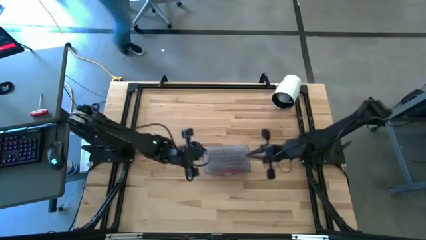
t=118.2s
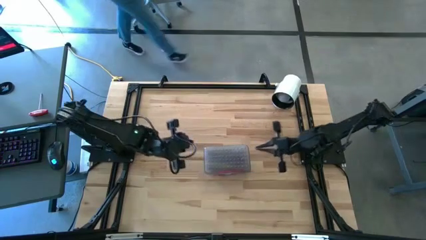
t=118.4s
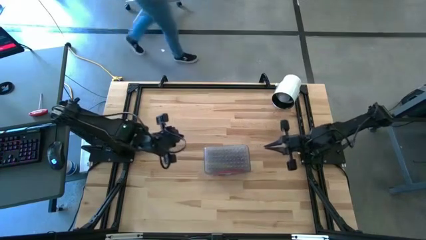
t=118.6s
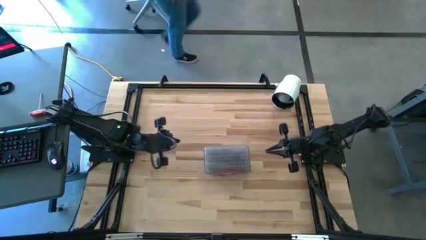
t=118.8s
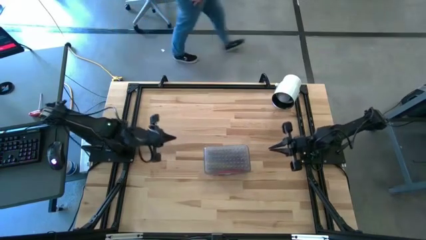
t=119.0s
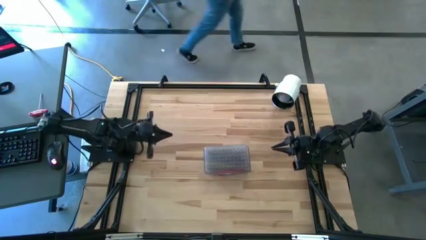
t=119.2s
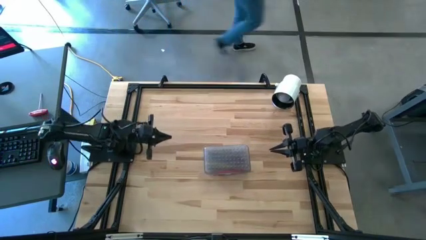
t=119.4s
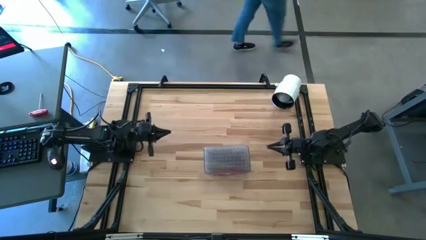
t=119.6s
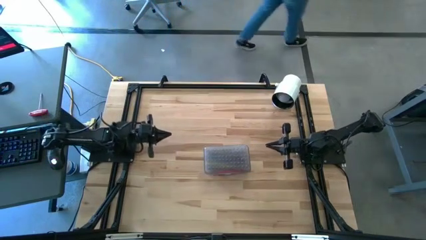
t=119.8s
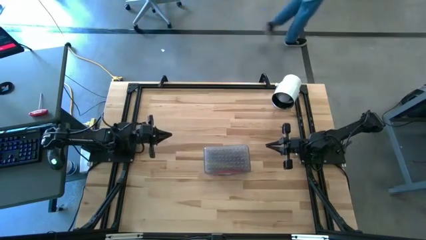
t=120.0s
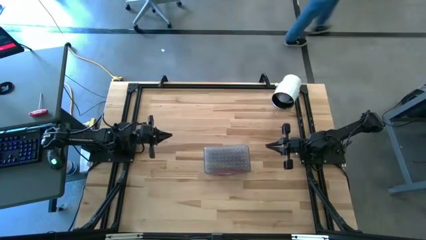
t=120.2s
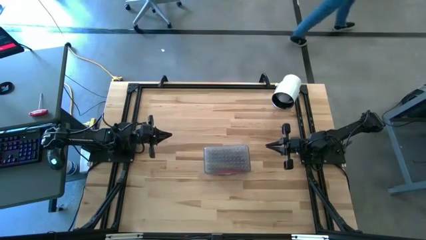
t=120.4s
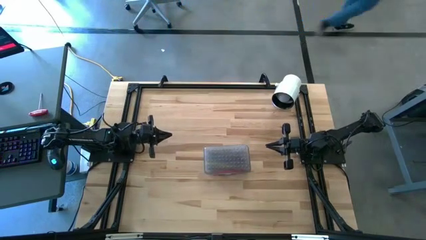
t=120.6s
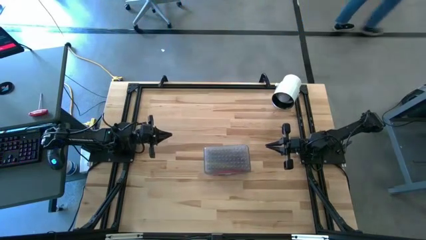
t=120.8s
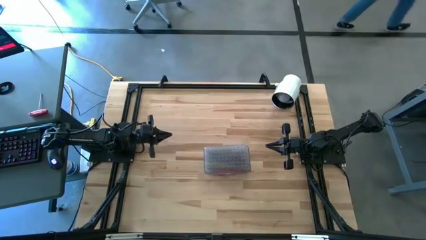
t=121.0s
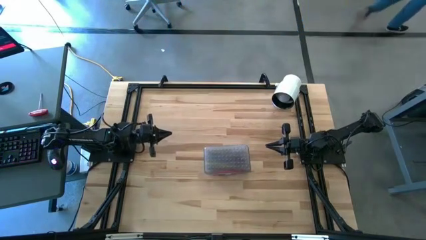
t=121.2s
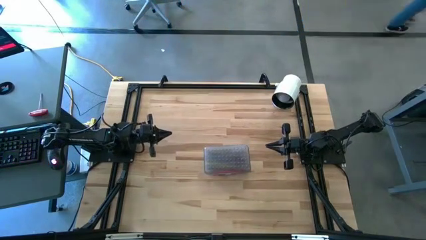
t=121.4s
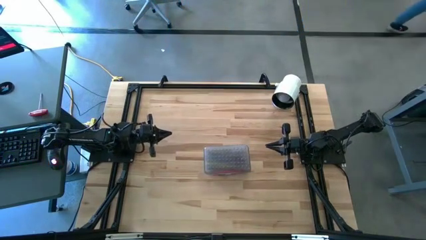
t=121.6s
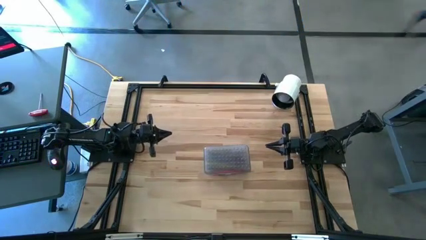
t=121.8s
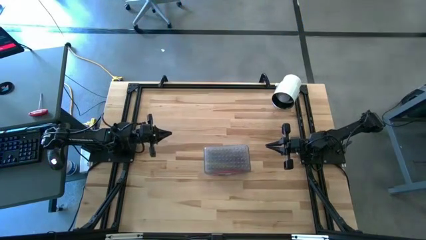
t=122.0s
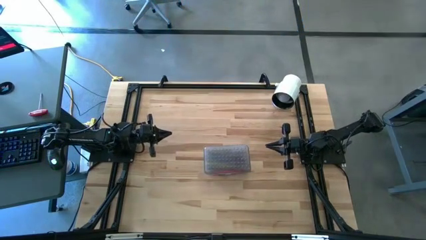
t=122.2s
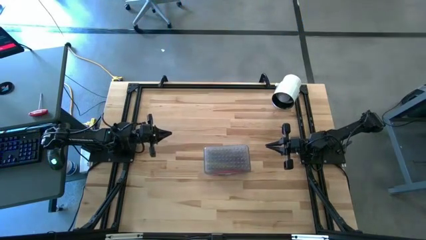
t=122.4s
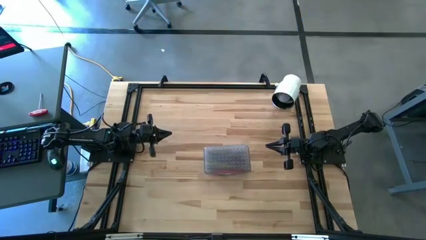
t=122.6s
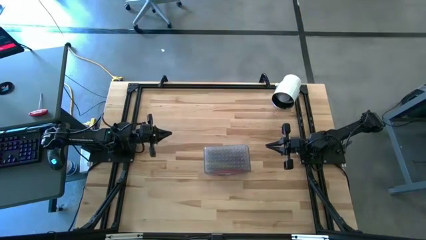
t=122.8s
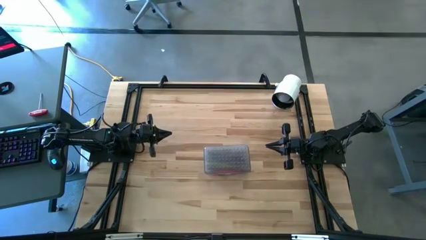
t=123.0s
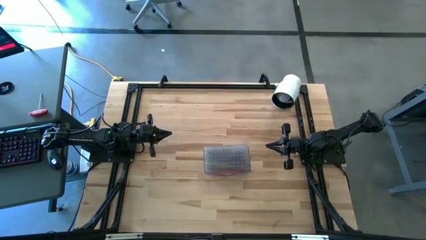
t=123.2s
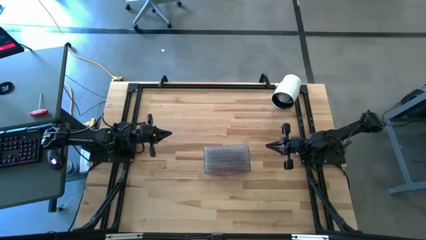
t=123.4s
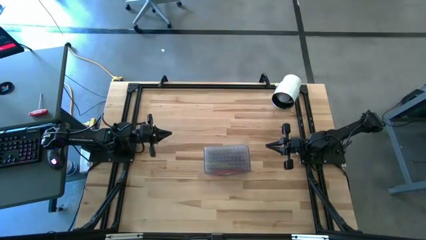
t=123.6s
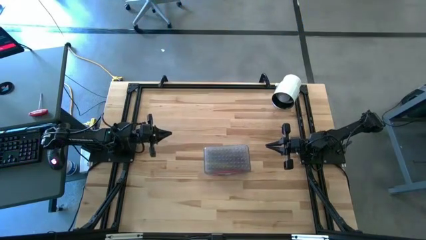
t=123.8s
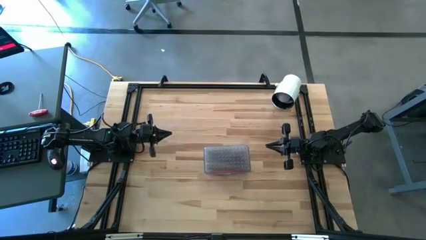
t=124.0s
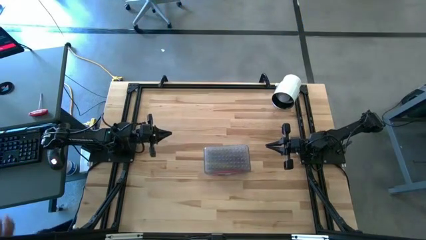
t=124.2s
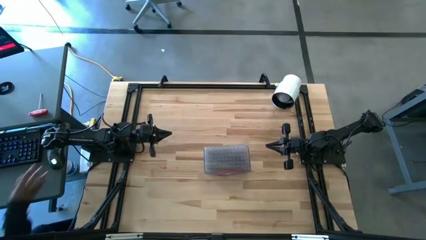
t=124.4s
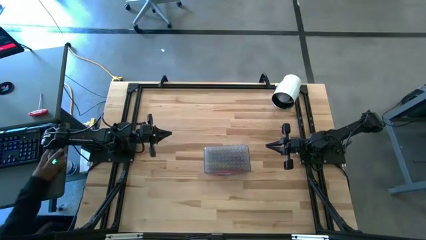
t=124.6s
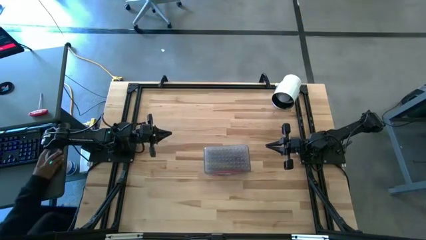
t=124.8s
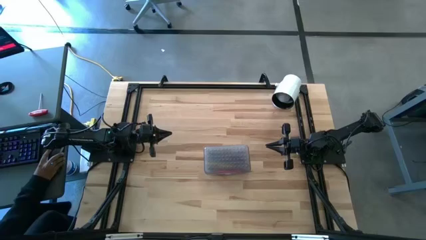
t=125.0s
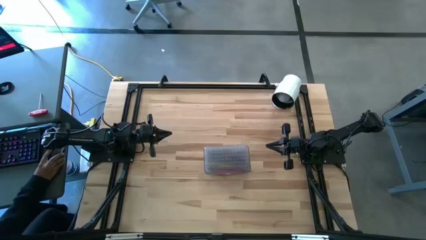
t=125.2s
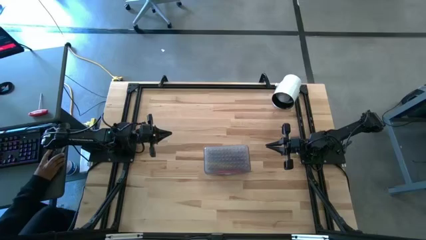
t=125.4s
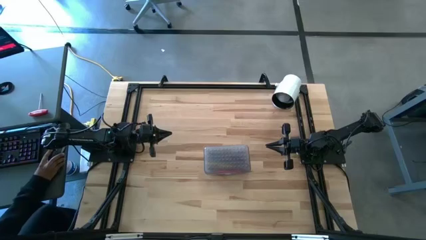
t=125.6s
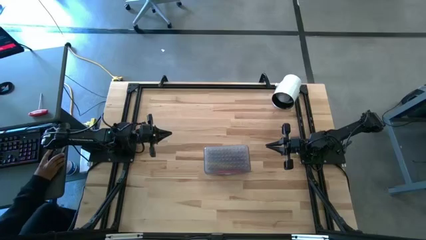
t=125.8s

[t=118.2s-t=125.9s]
Task: Pick & place school supplies into a supply box
Return to Home Position

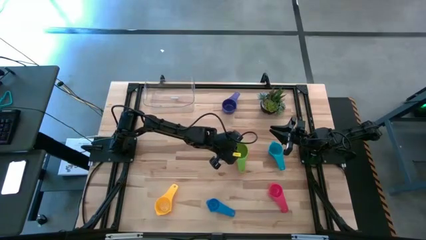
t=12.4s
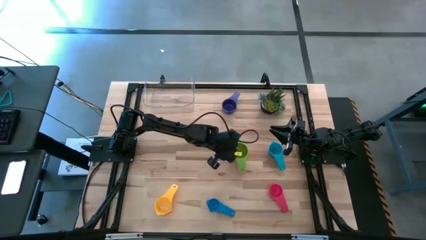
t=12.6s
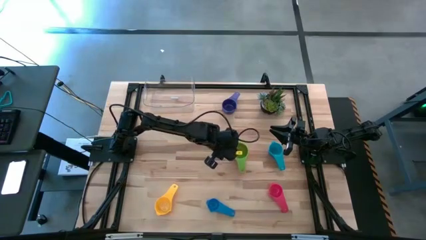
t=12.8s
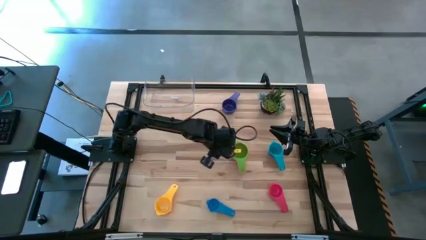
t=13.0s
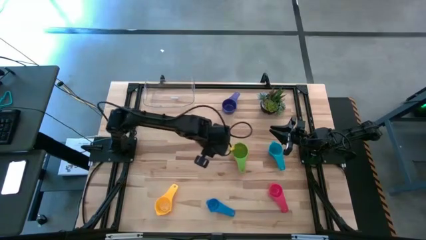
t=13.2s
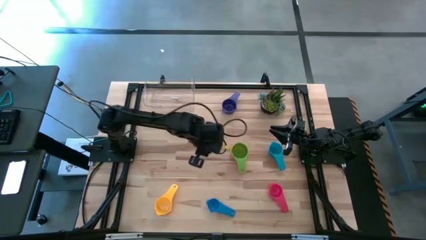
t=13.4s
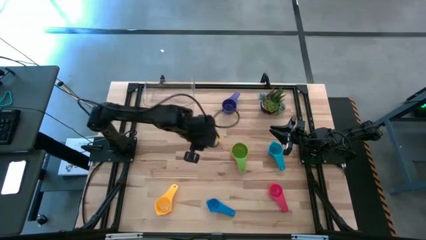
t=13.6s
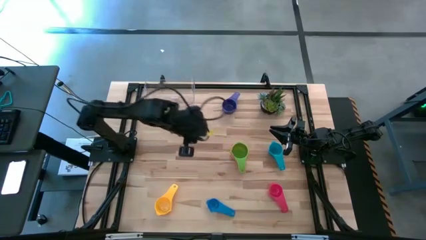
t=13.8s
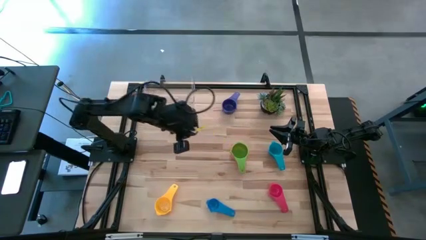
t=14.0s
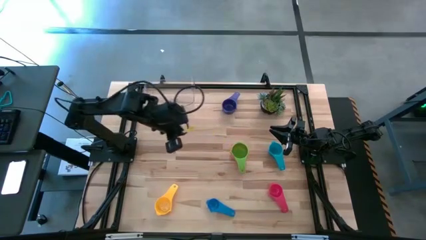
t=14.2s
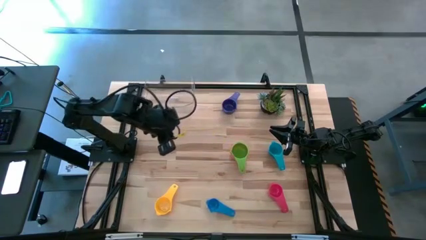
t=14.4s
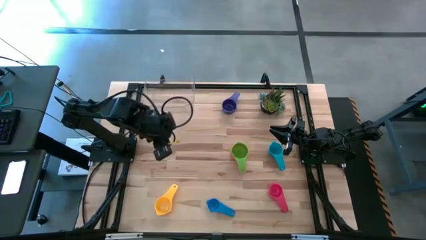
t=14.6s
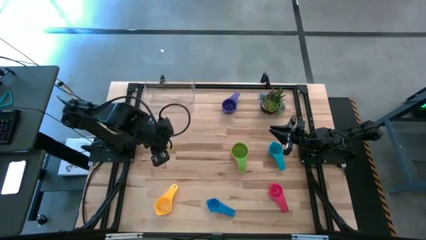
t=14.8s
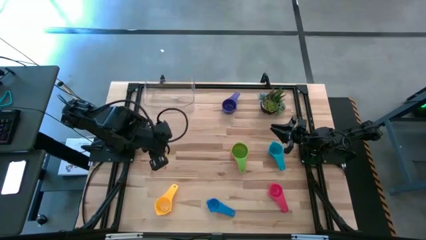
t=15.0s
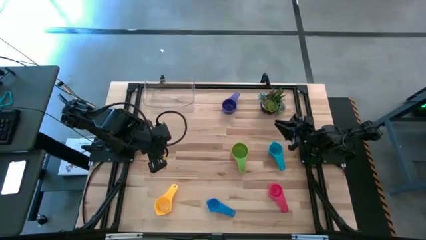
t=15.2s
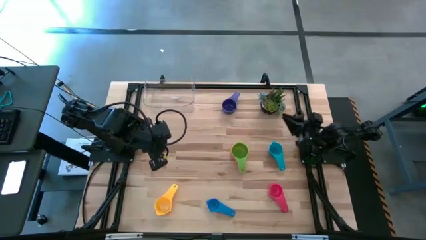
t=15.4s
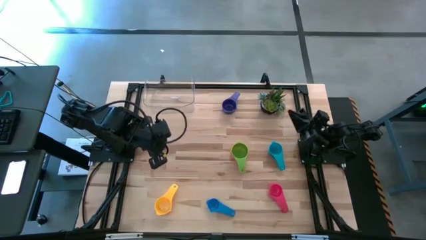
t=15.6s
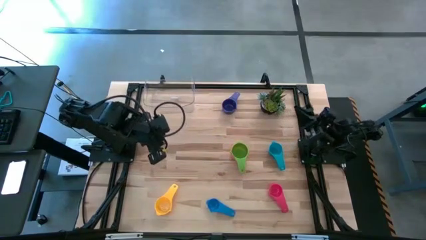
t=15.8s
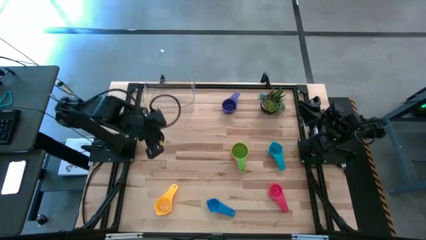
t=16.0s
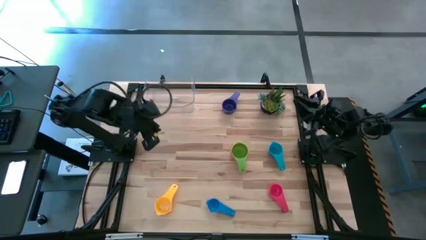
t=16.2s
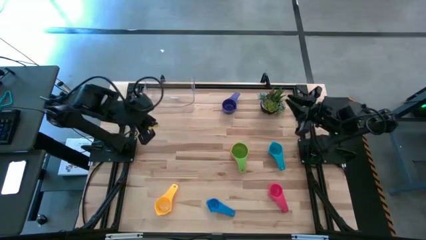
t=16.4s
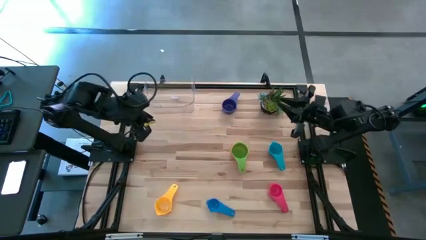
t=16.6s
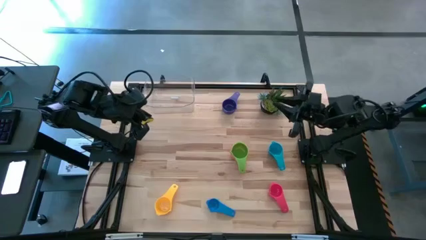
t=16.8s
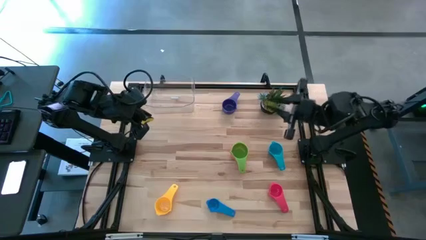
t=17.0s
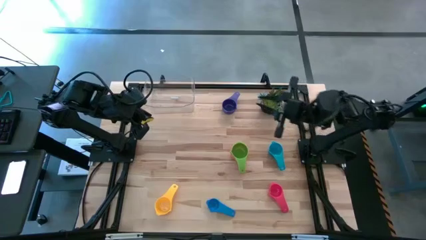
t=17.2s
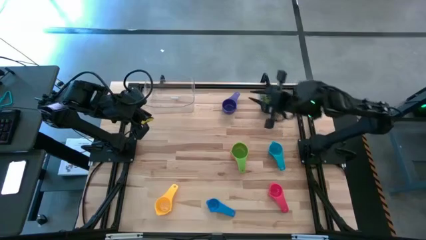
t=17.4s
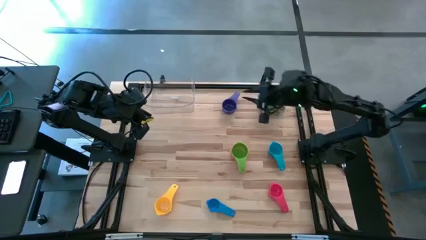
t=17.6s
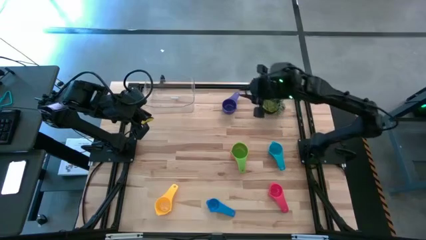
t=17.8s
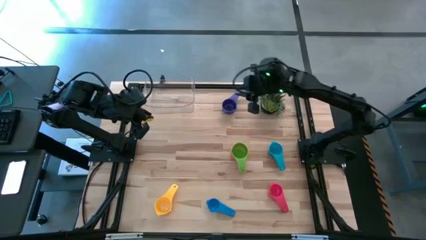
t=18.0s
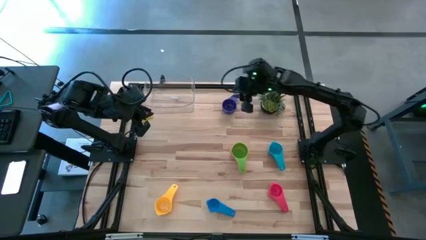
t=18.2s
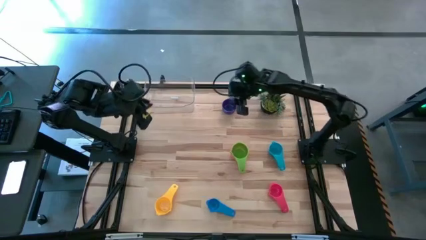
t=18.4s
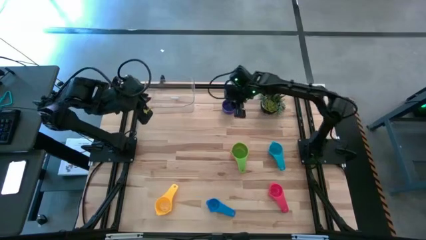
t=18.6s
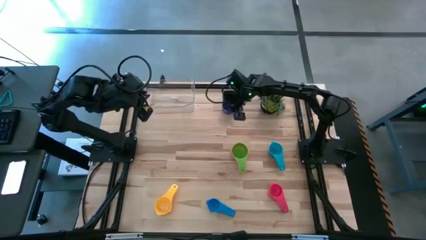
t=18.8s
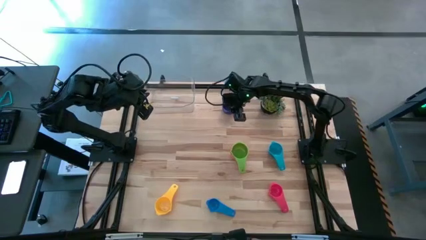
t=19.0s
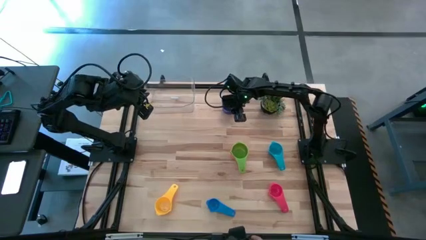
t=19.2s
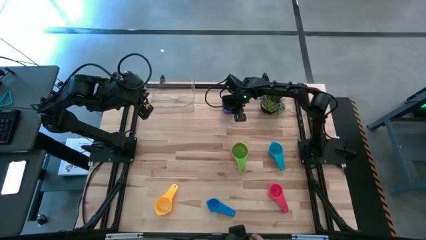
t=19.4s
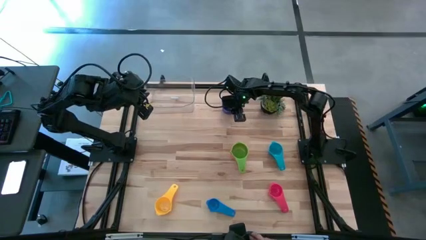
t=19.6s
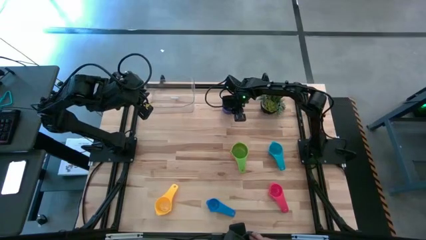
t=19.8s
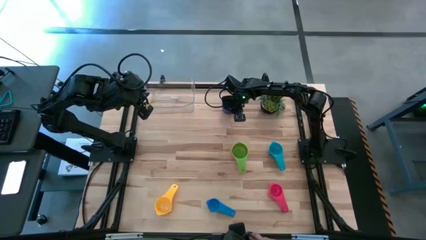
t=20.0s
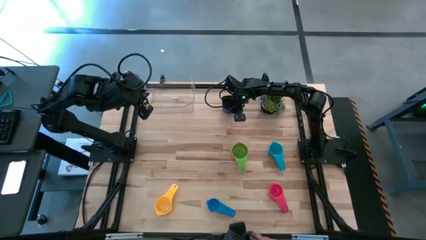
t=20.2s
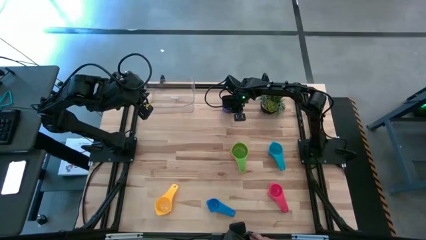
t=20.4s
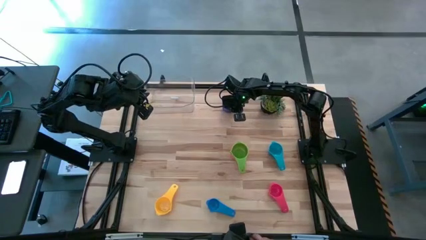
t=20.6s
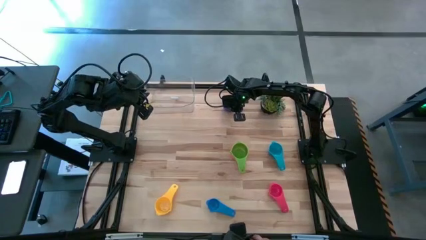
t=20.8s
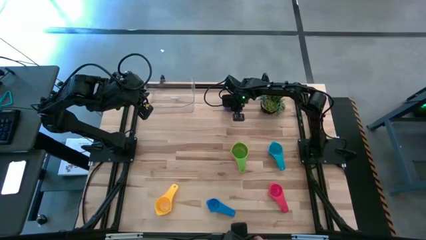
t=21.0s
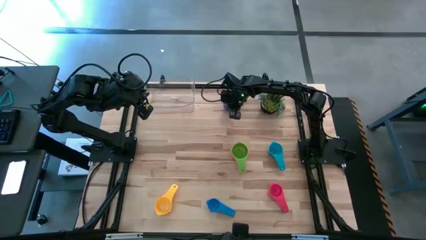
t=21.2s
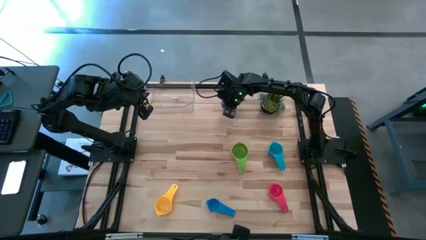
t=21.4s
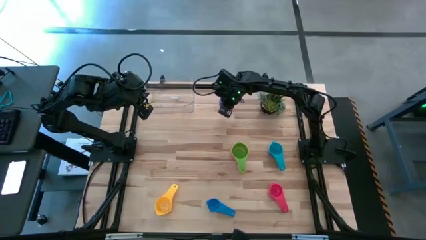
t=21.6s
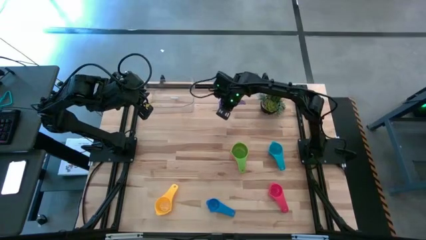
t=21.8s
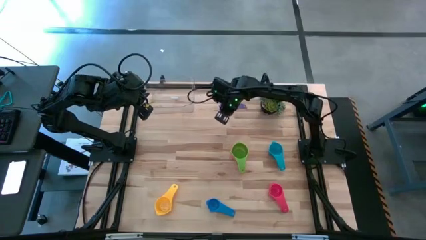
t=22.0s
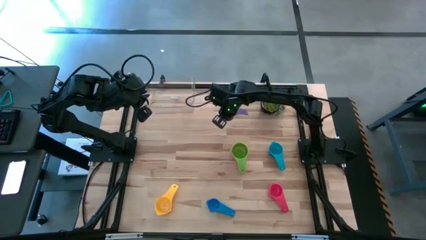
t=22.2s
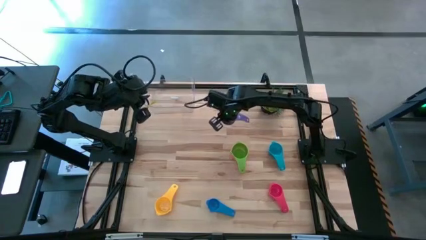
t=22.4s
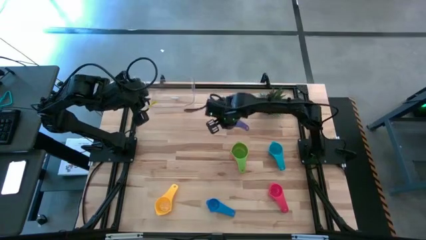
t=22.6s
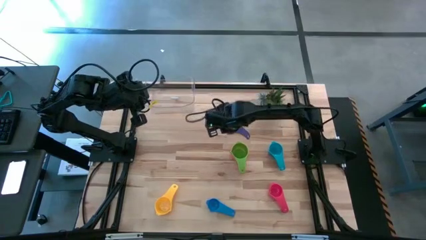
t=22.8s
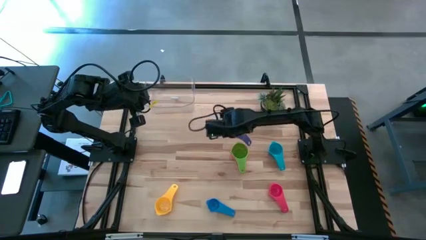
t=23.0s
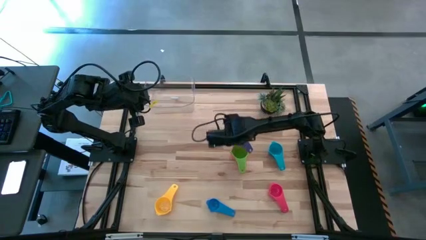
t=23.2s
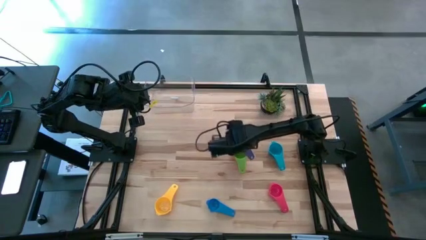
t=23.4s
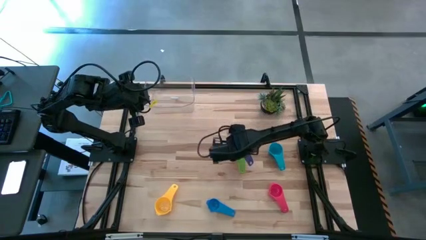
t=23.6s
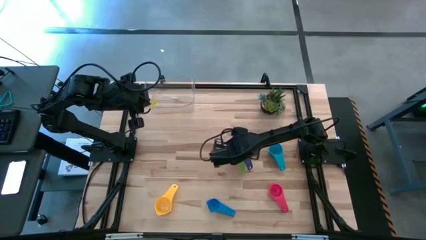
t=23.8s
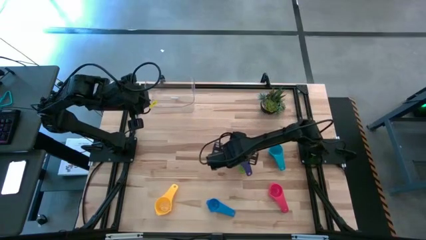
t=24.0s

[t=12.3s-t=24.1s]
Task: Nest measuring cups in basket
Stack the dark blue measuring cup on top of the green measuring cup
